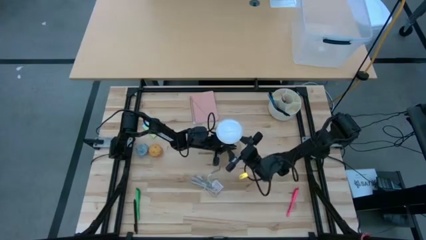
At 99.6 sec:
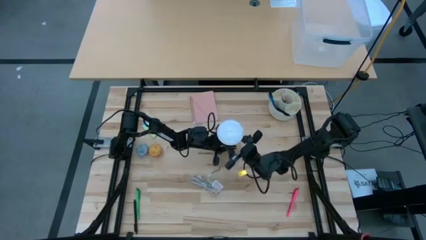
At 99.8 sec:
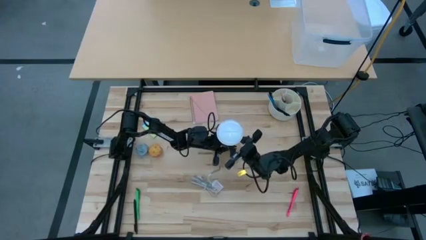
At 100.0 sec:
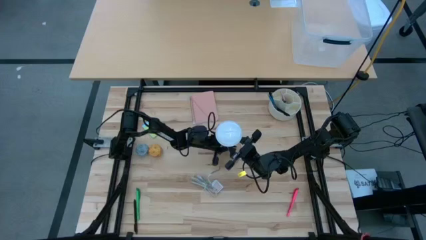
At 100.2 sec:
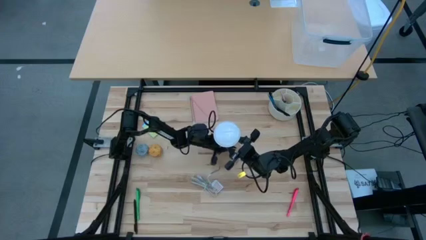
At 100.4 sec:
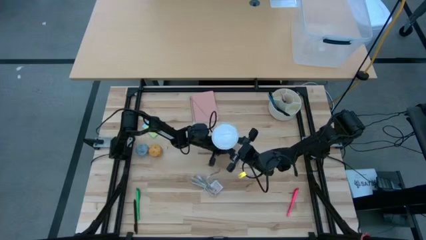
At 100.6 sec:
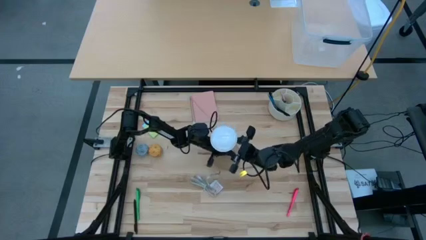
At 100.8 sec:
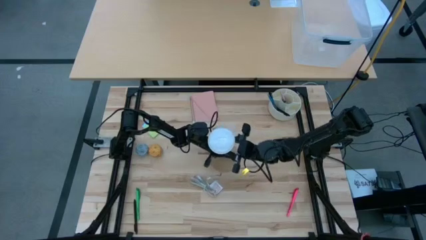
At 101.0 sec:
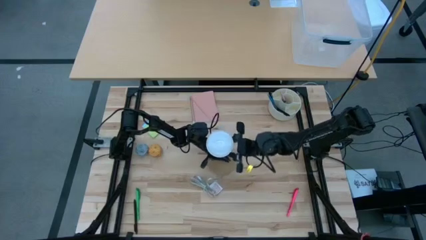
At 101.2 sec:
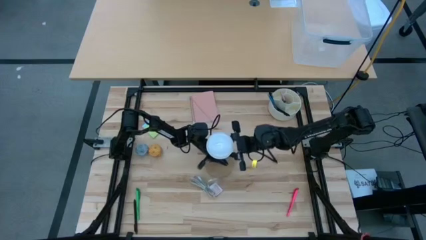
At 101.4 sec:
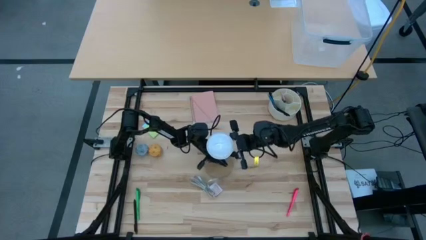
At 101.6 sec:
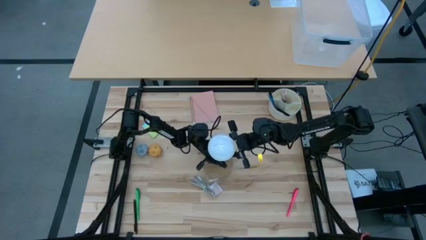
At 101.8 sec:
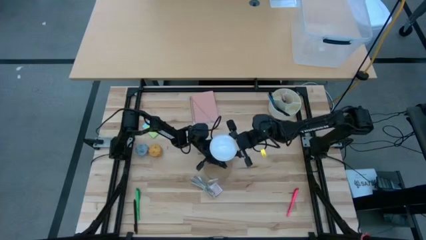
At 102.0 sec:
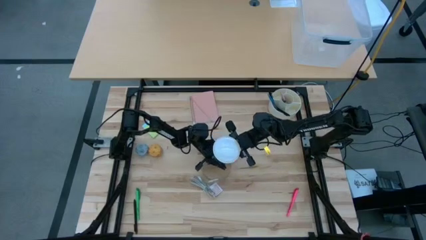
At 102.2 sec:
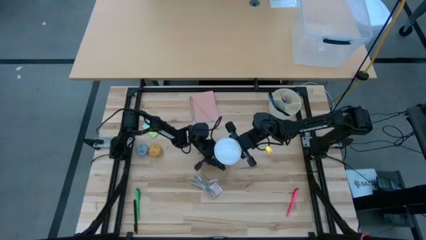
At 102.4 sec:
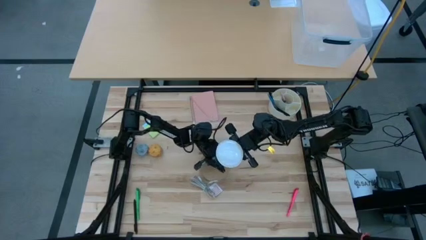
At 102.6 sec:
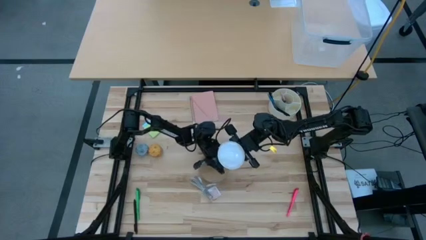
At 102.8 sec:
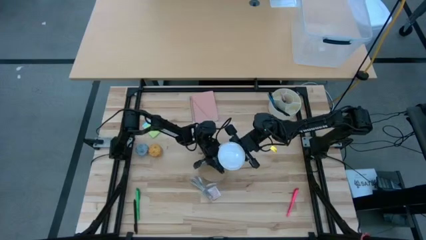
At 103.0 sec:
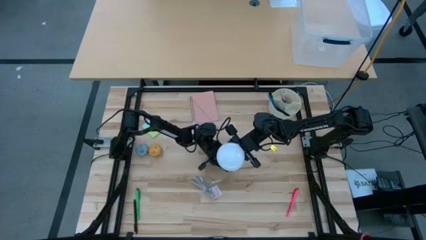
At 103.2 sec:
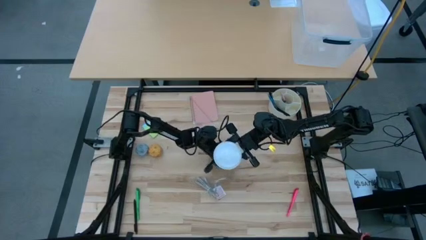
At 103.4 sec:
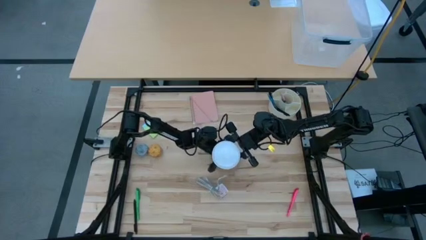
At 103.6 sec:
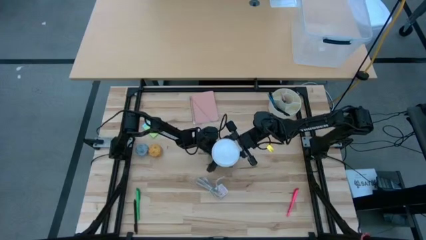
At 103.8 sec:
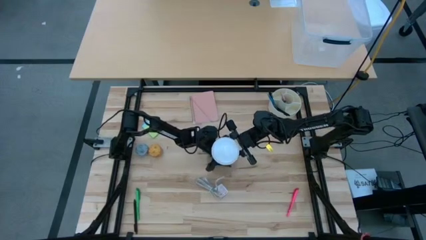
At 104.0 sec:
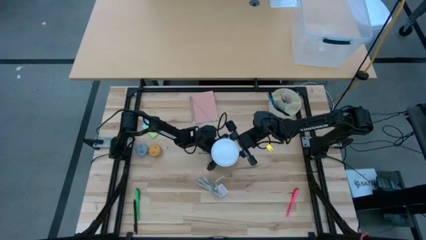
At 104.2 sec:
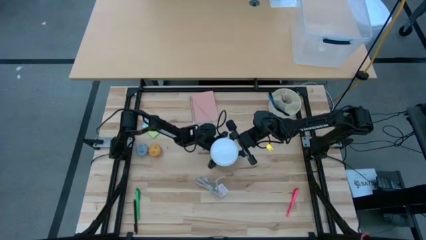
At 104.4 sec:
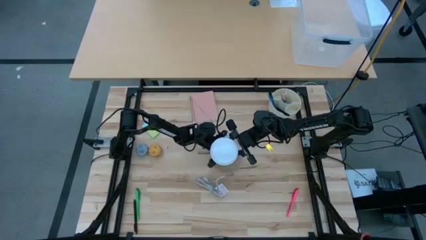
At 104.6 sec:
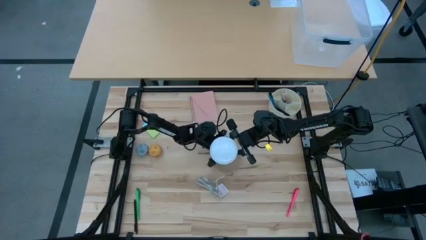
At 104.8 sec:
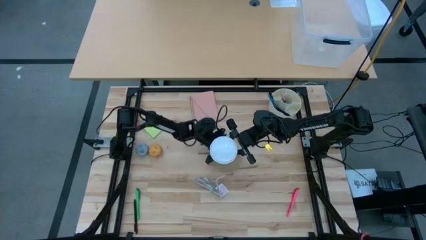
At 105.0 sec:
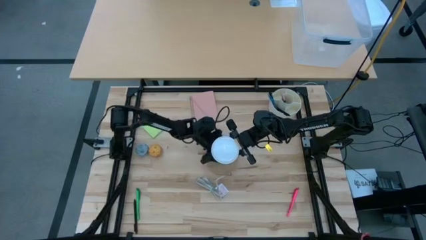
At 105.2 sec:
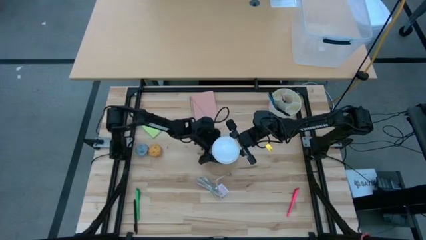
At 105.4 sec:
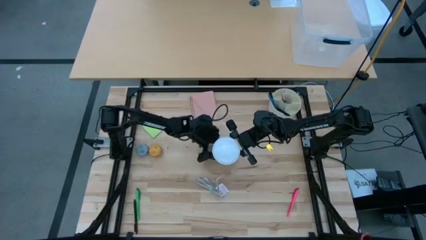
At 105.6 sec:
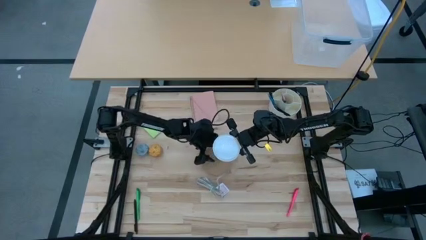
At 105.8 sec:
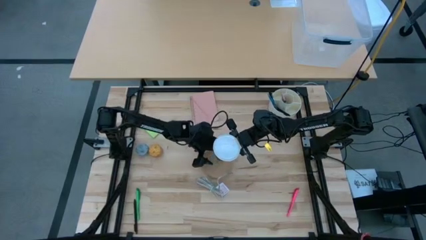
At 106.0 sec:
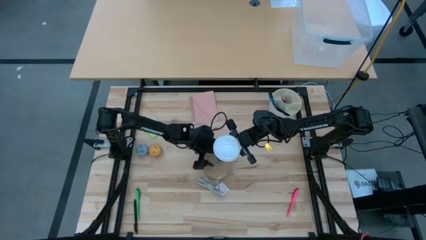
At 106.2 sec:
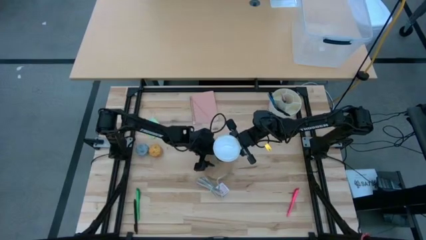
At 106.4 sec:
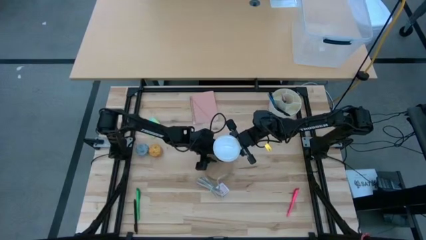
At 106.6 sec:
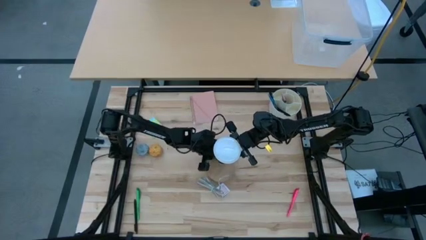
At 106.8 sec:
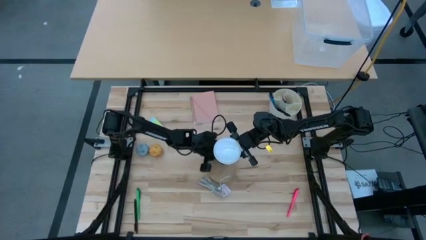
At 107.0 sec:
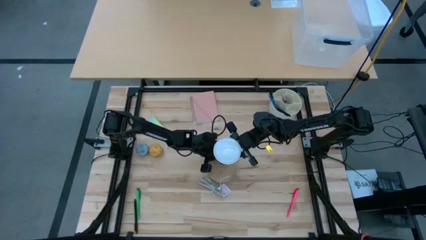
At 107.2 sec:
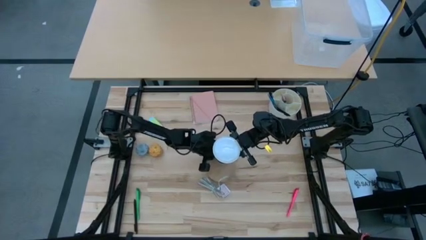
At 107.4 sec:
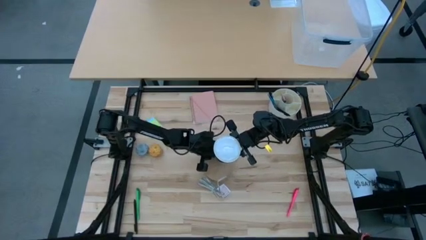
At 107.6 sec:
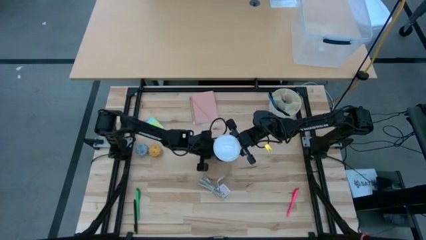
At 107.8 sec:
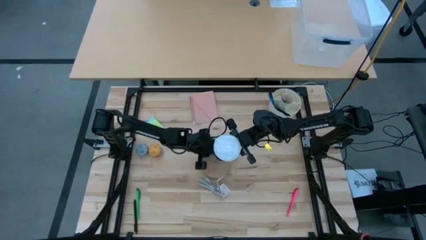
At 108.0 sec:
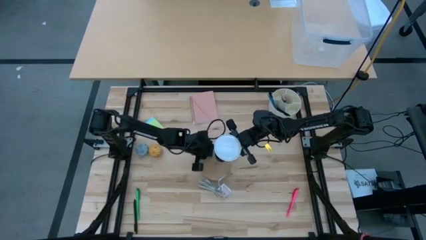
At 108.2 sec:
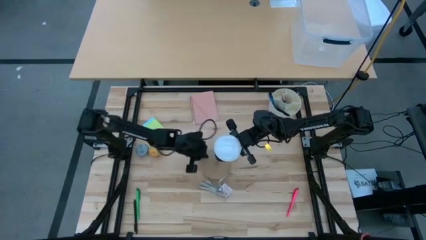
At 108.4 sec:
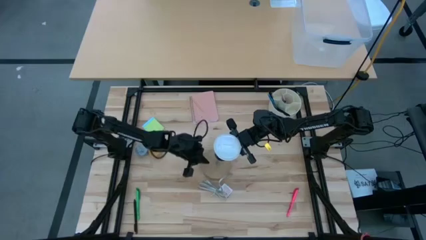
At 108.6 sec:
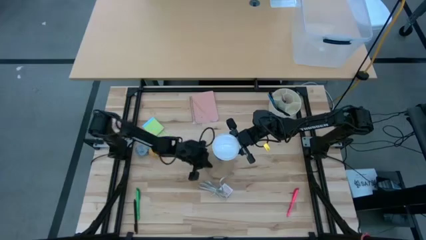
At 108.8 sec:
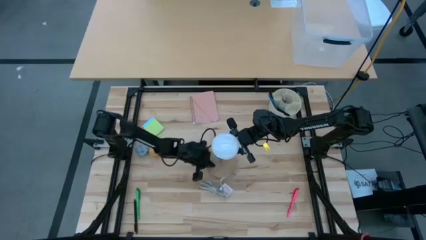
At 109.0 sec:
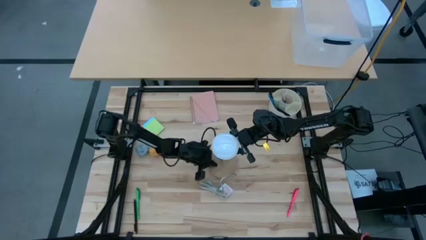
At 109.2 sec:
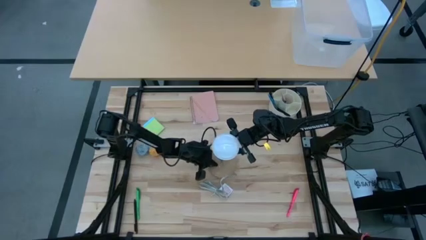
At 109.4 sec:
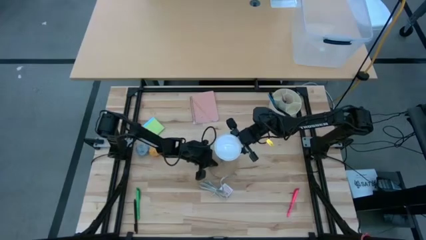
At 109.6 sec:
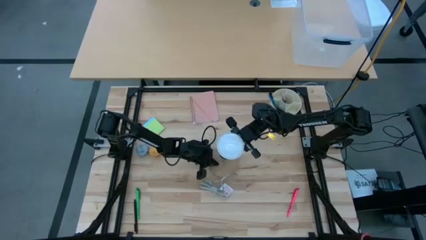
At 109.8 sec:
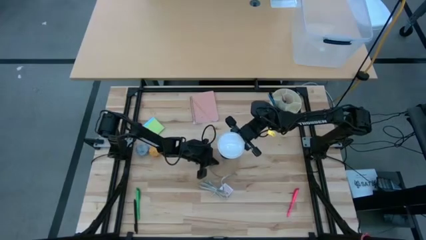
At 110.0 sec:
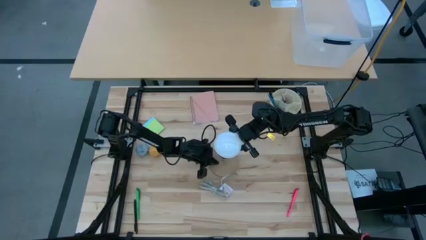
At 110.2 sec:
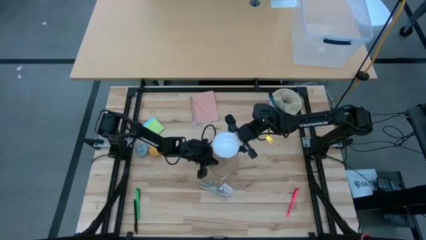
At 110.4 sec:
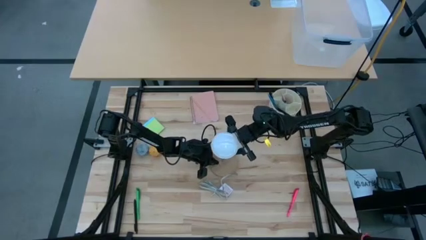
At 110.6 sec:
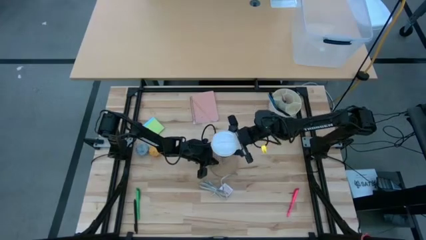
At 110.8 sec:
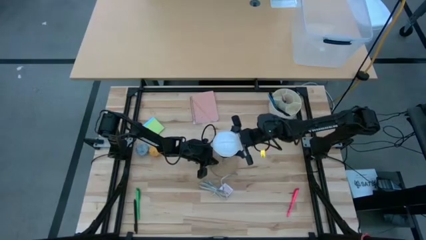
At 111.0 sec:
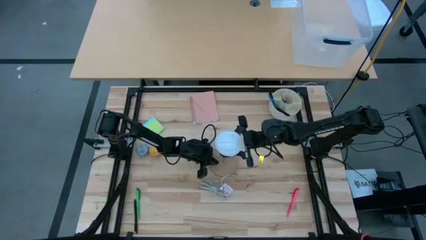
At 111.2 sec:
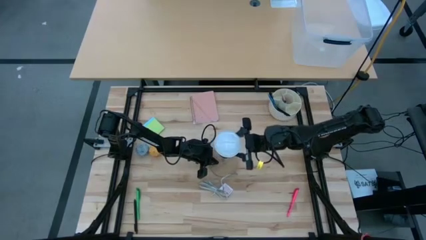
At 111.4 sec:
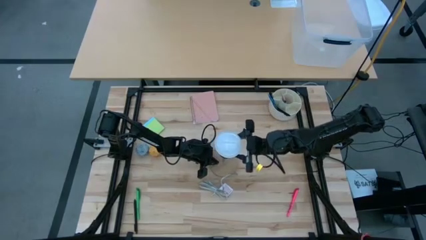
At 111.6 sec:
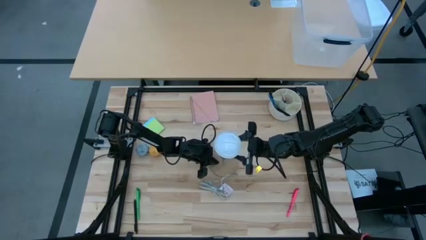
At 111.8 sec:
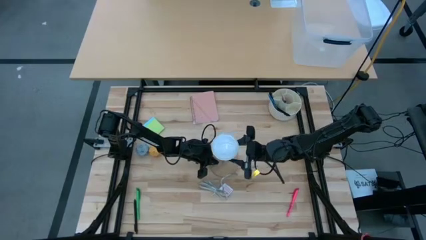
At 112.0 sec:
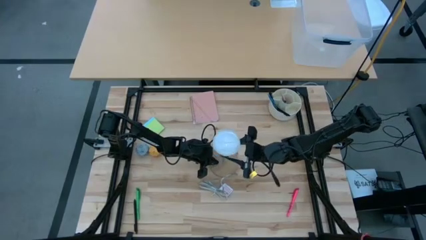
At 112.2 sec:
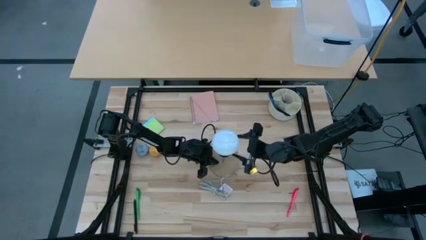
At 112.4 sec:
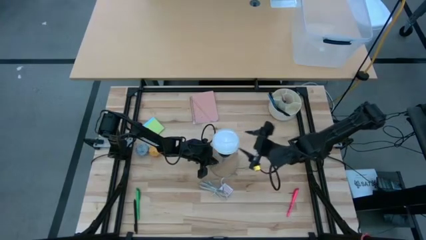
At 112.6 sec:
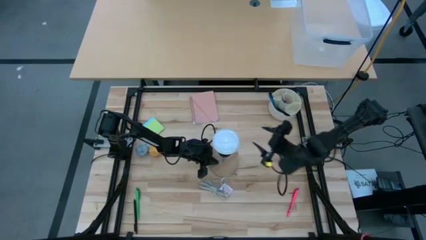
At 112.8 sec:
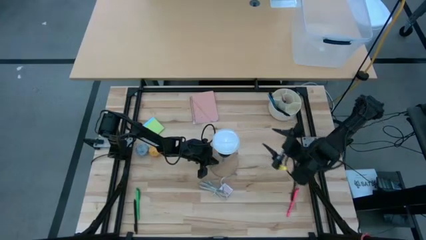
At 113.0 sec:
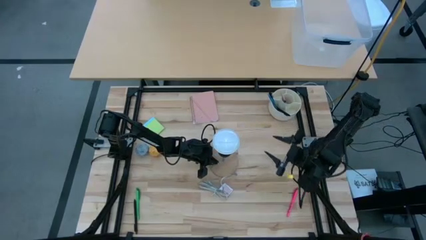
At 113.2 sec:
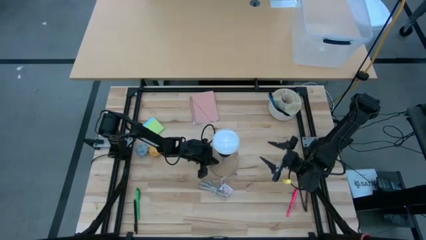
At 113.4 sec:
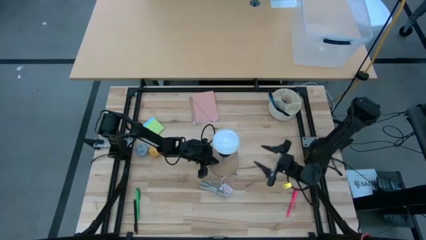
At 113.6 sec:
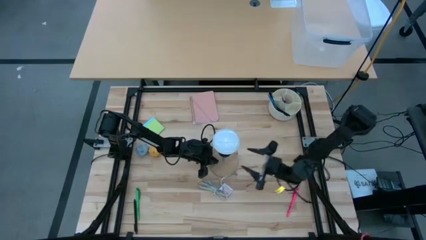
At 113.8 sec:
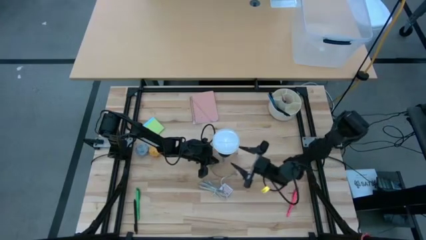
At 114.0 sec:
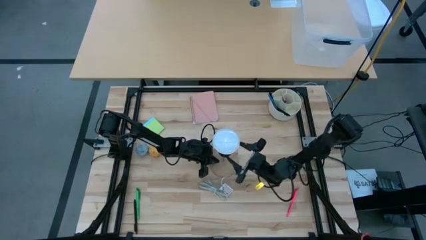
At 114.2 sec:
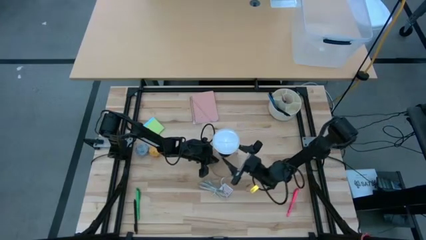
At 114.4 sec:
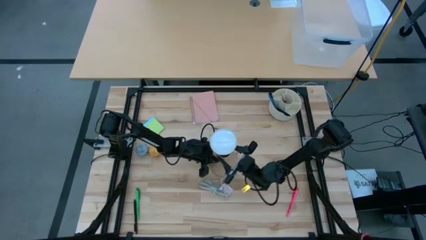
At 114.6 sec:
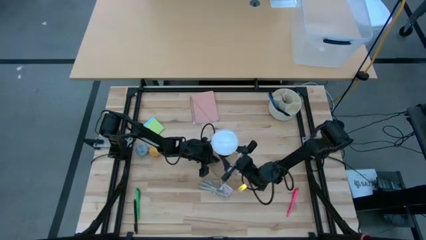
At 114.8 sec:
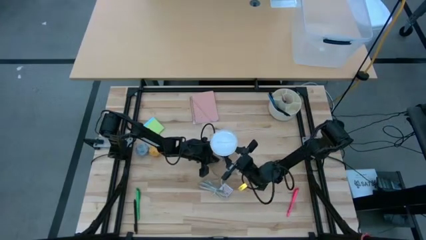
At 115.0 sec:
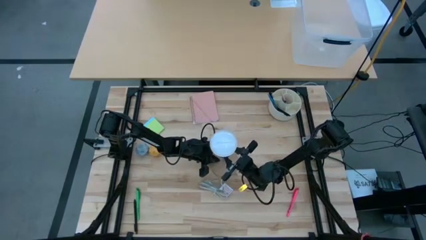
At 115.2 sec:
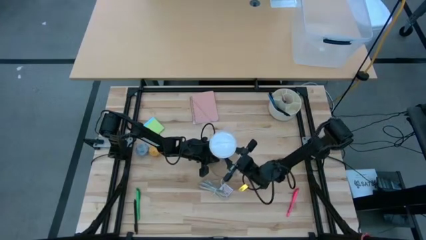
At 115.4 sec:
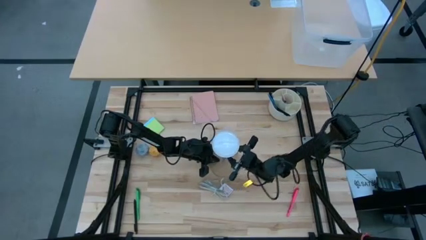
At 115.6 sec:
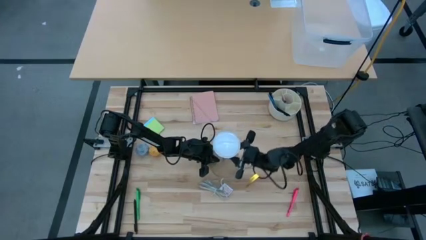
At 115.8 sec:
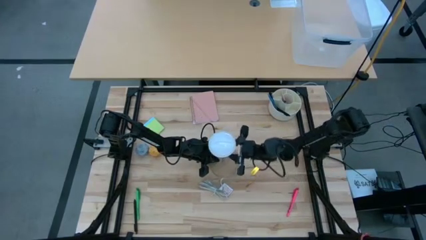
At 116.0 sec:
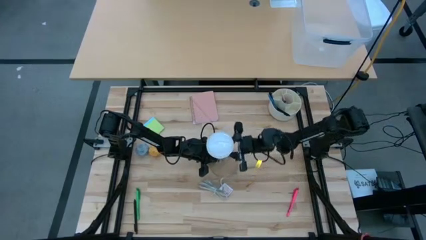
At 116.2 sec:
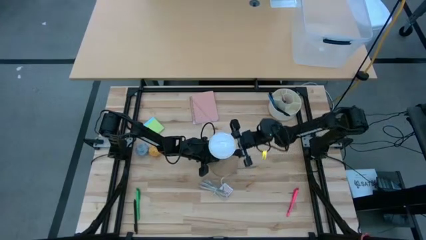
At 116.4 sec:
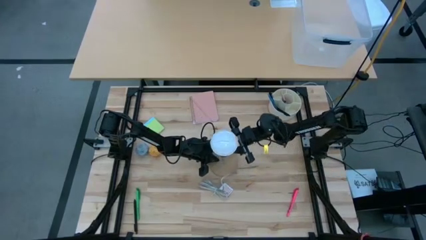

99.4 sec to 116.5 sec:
Task: Screw lightbulb
Remove the lightbulb from the lamp
